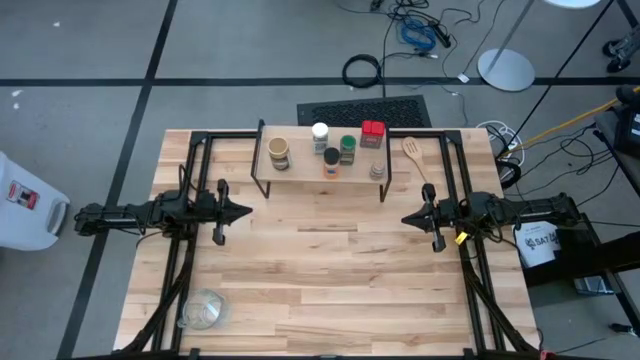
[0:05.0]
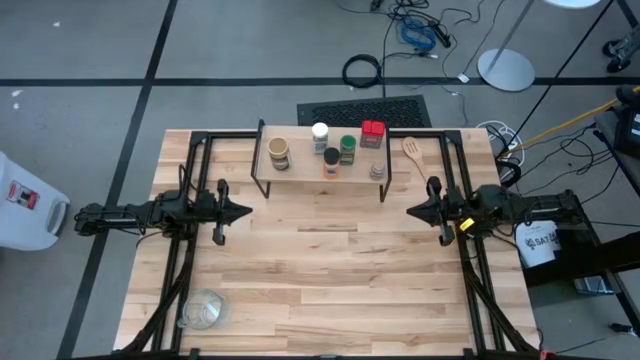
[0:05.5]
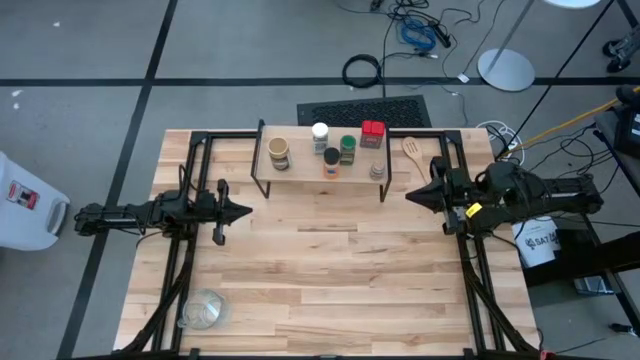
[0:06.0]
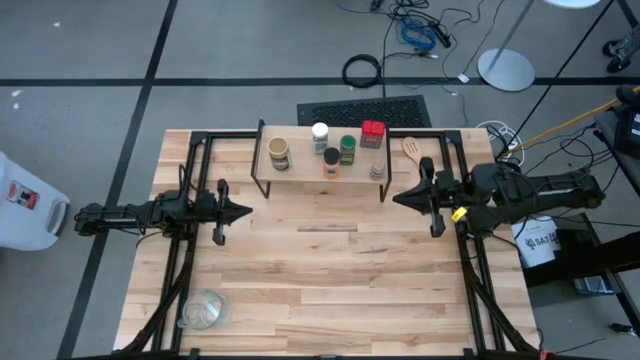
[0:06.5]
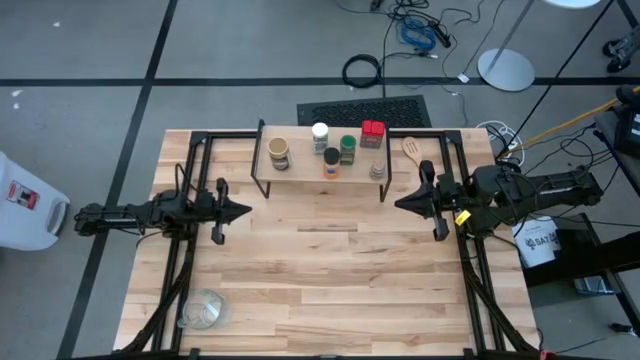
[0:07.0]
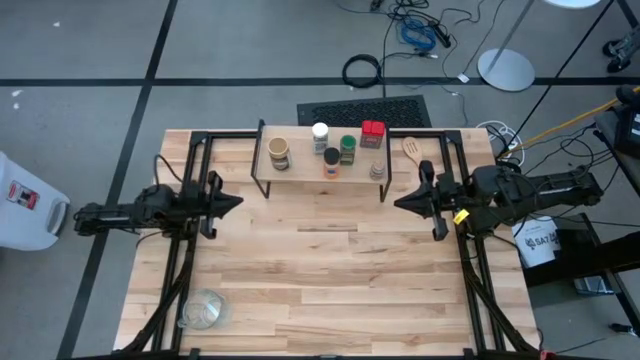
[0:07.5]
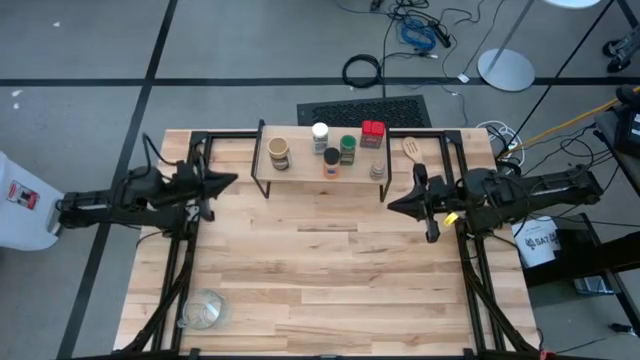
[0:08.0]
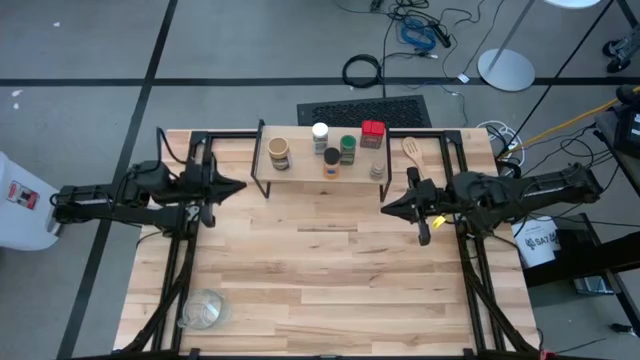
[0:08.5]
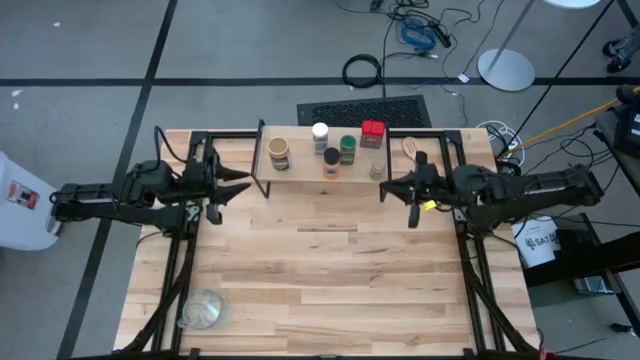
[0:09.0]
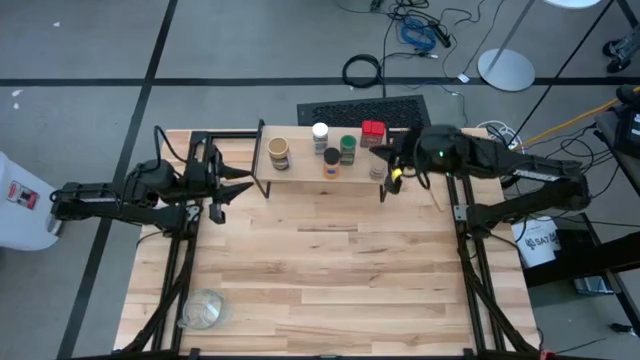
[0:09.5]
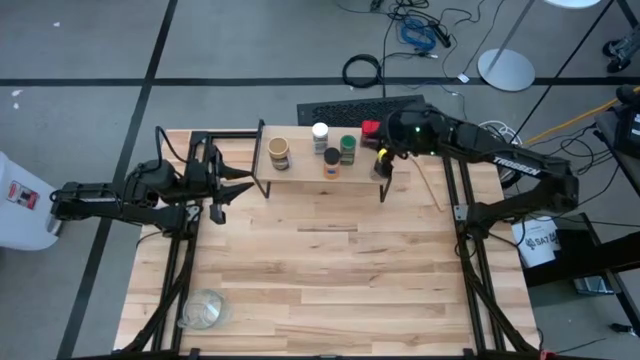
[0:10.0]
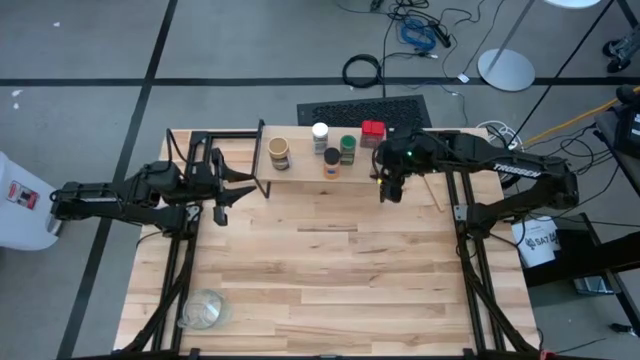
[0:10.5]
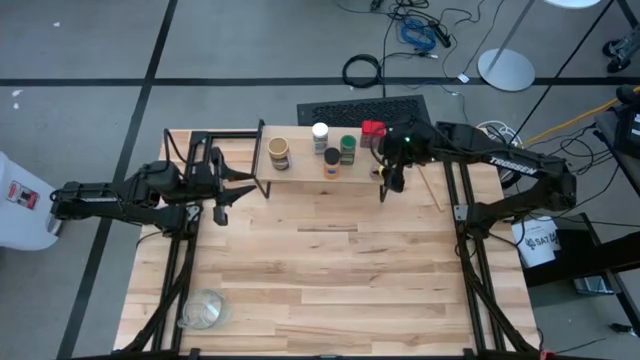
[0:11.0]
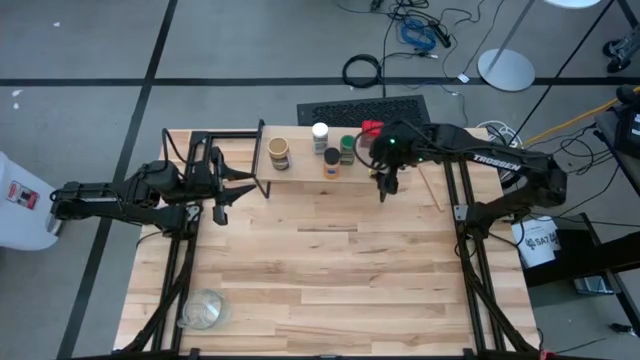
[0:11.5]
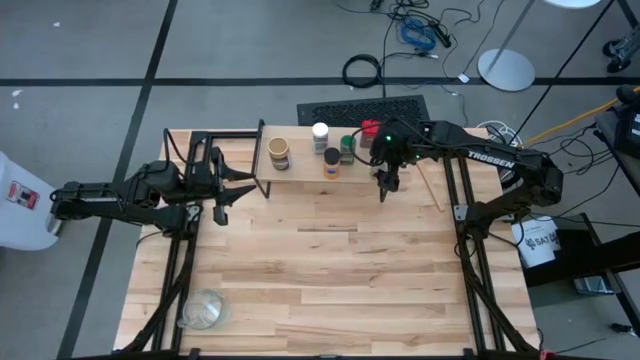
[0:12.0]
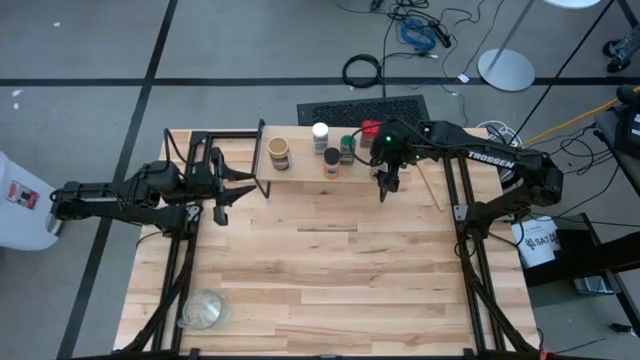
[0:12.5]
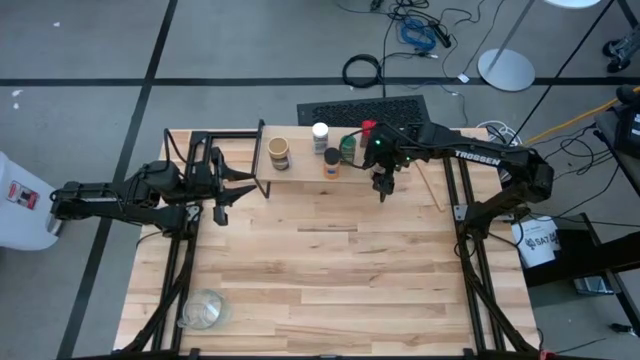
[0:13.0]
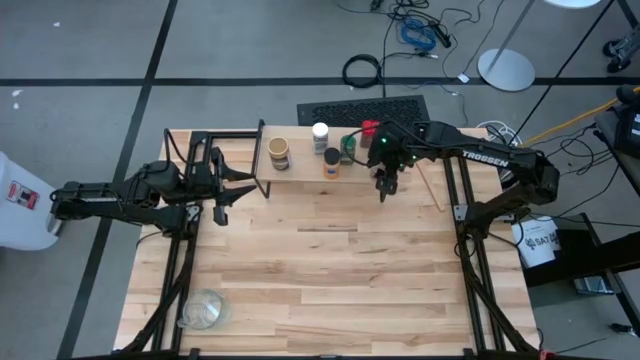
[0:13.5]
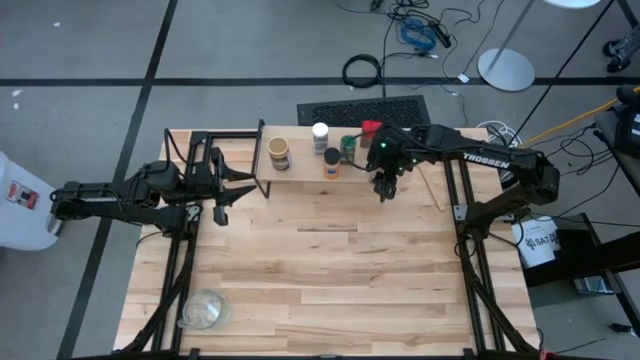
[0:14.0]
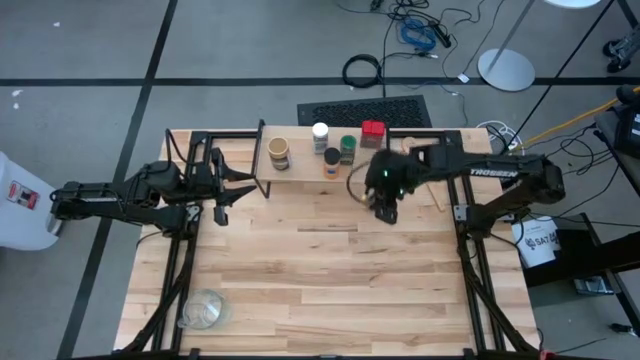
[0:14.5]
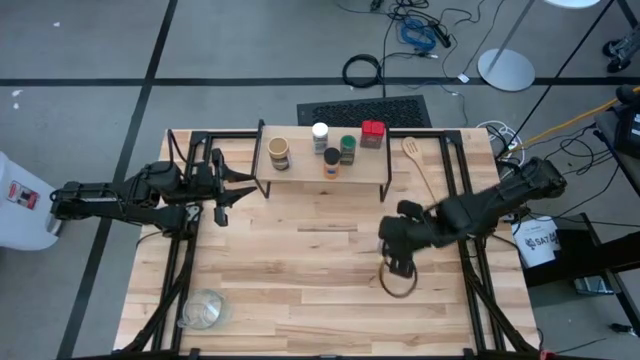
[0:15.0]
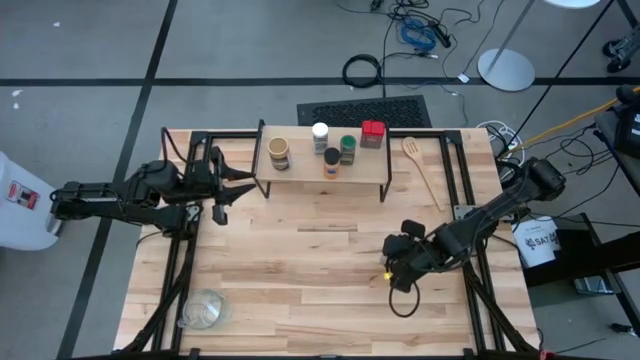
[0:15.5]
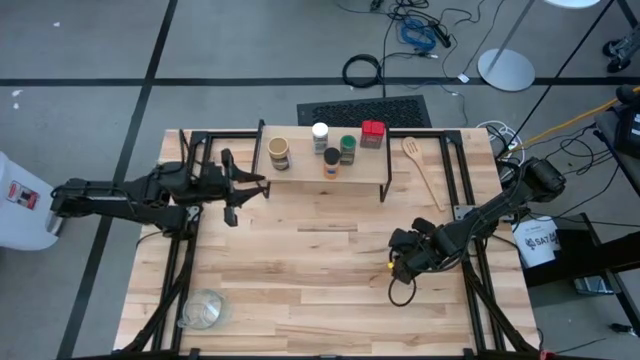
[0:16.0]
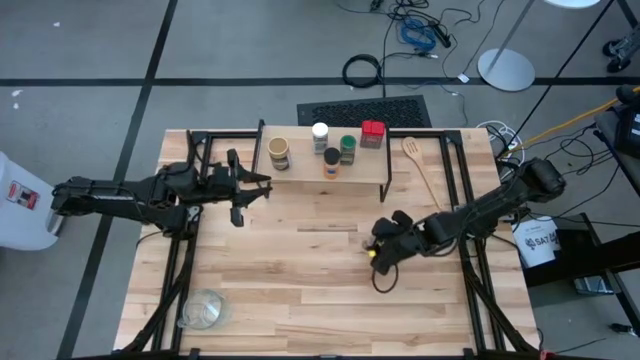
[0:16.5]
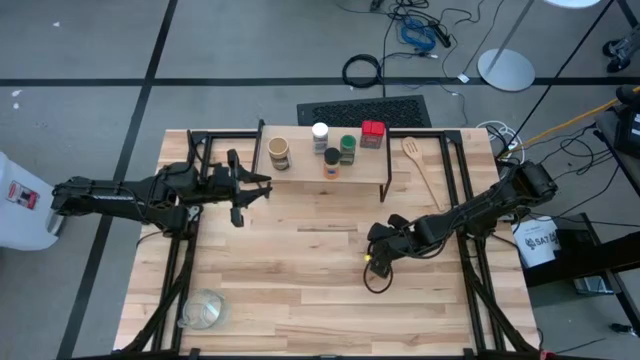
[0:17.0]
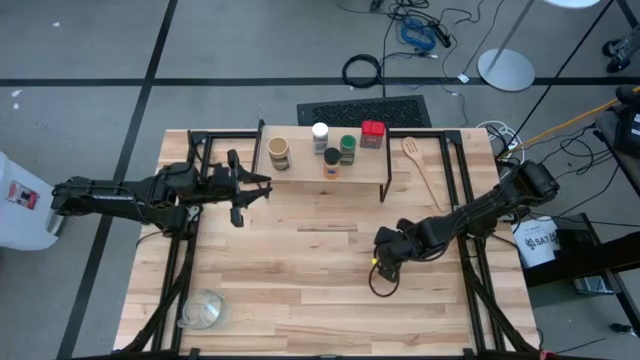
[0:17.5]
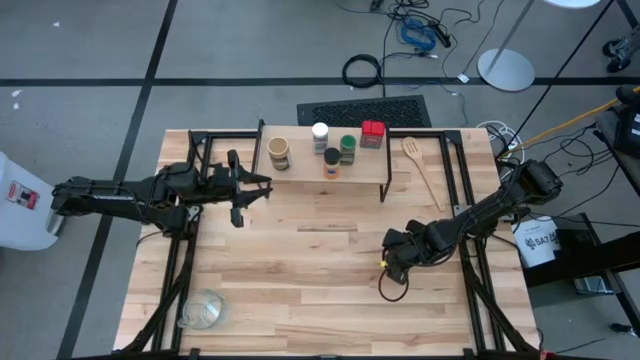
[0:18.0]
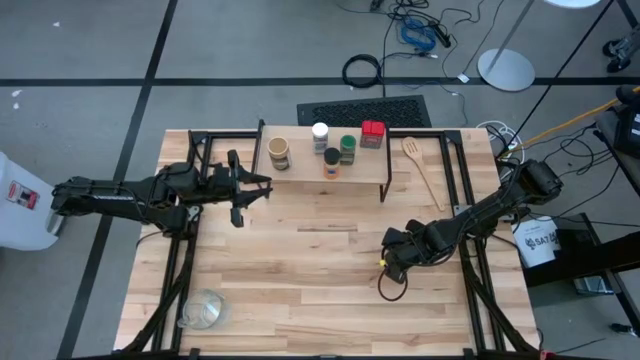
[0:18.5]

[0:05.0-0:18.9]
Task: Shelf spices
Remove the brown seasoning bottle from the shelf

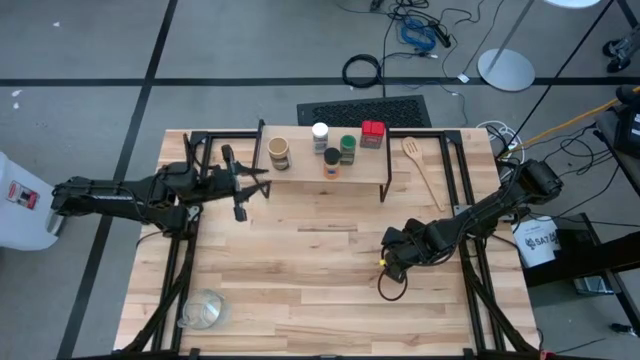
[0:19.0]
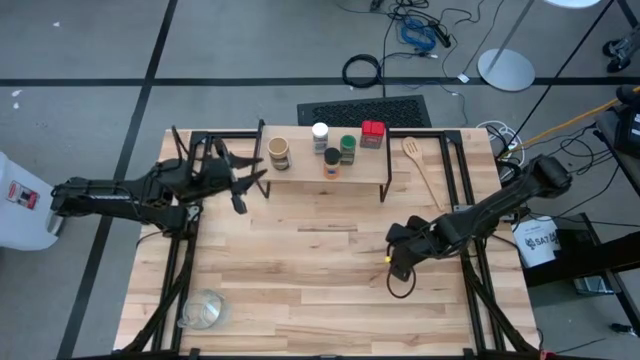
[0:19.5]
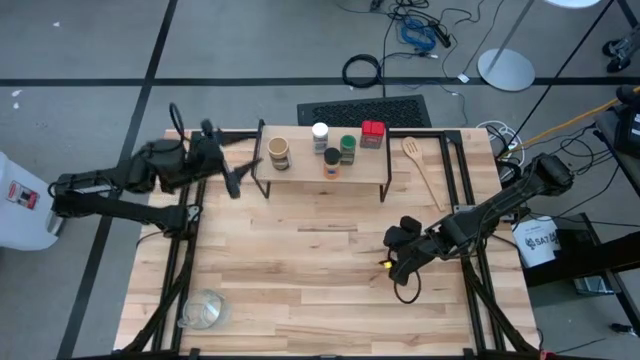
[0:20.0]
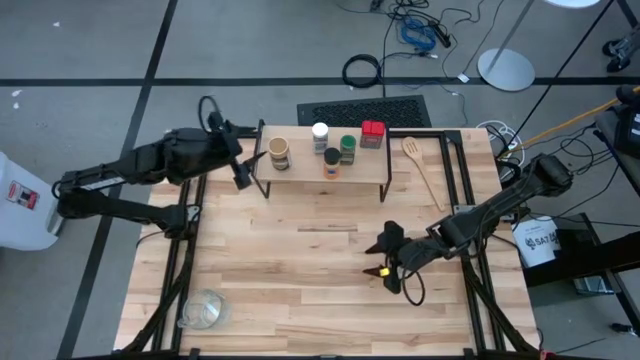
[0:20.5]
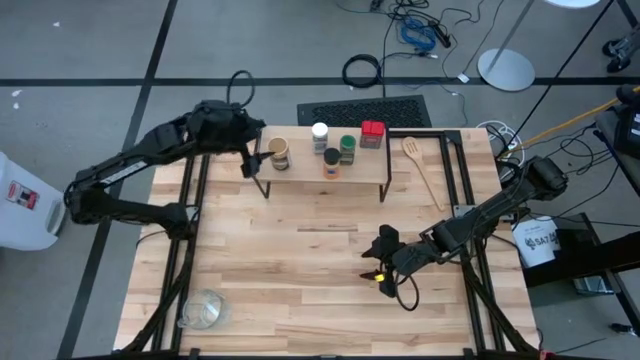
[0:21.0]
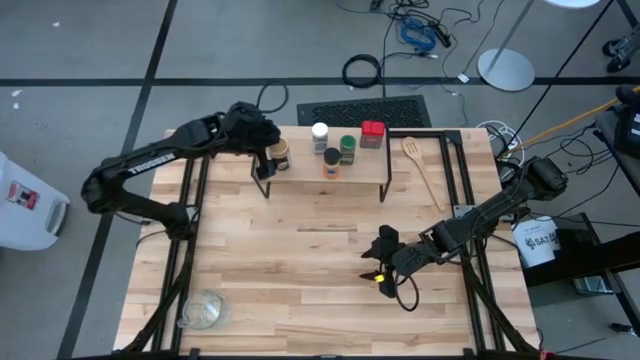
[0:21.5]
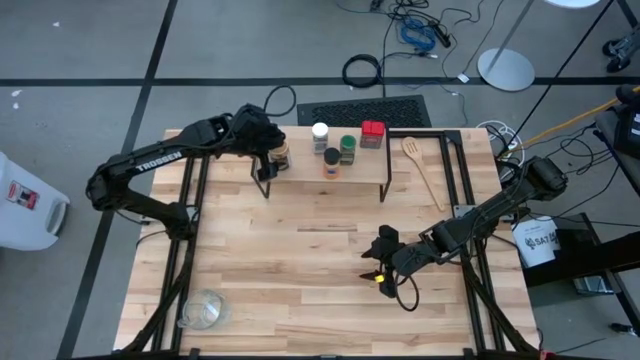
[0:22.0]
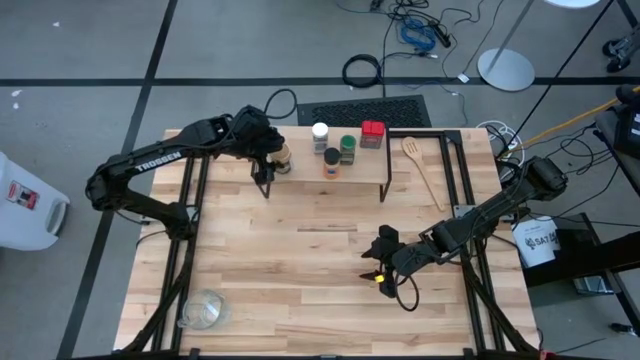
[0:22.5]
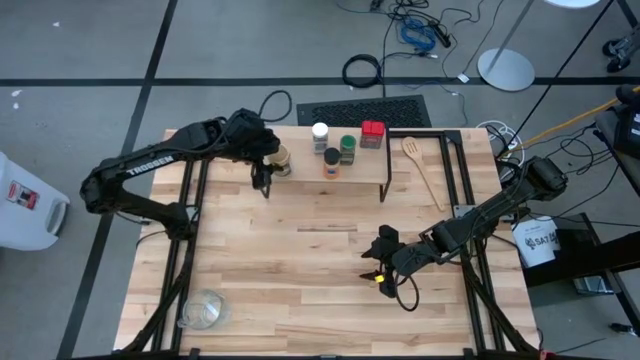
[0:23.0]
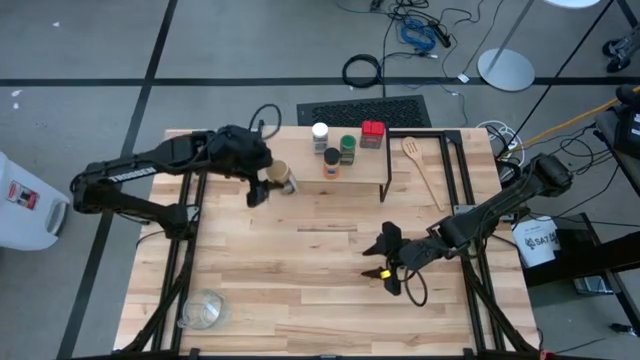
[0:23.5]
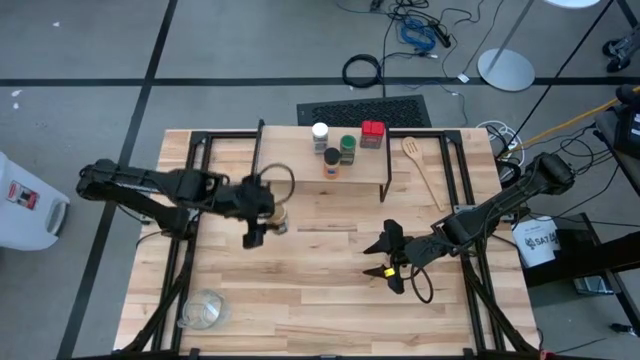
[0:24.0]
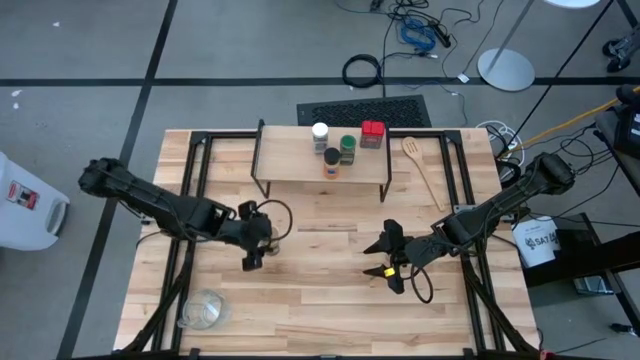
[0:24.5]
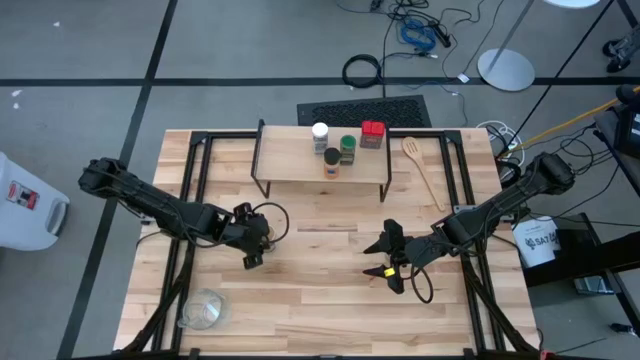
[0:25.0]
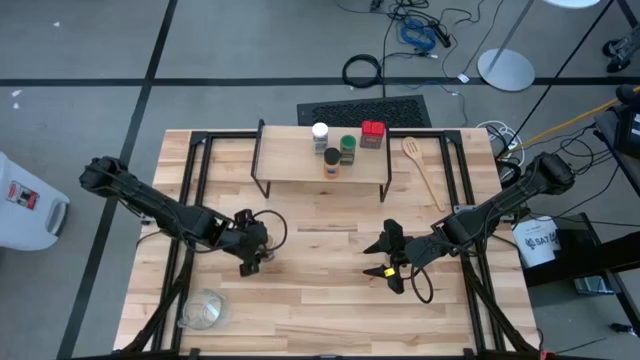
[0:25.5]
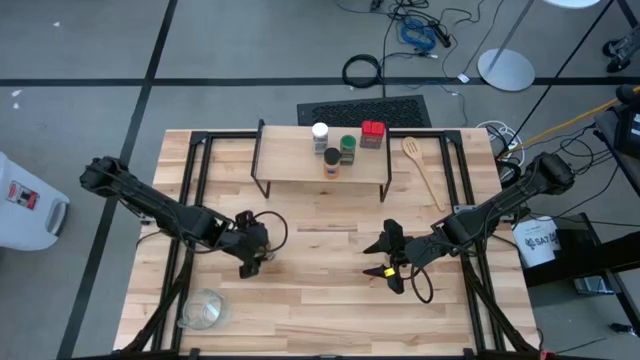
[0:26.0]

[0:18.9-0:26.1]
Remove the golden seasoning bottle from the shelf
